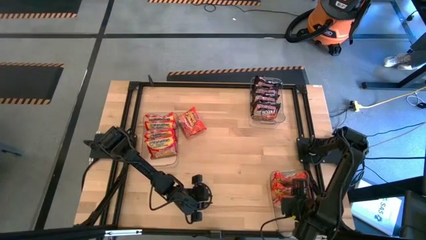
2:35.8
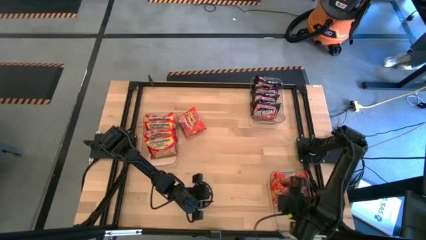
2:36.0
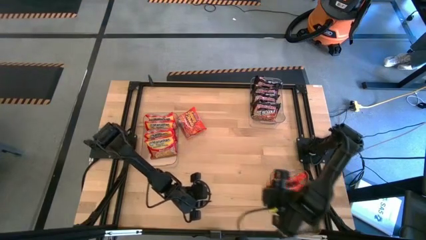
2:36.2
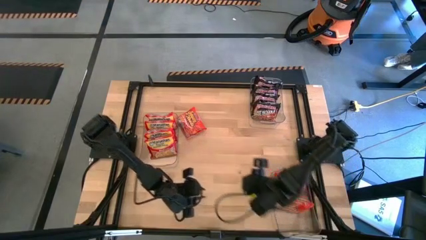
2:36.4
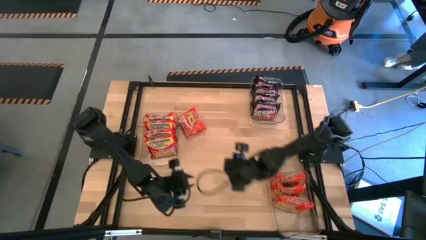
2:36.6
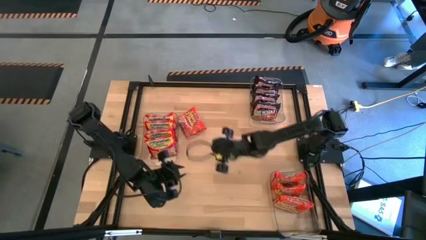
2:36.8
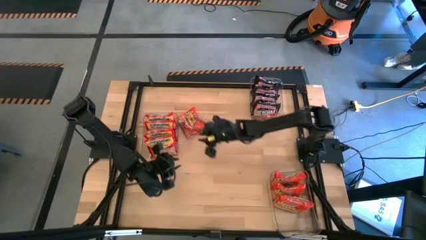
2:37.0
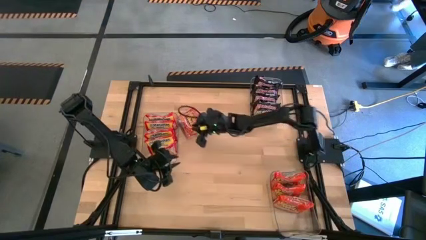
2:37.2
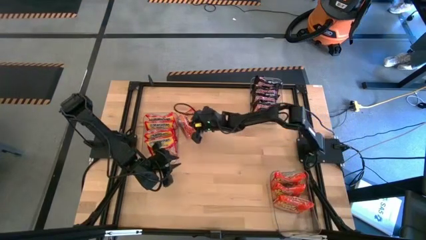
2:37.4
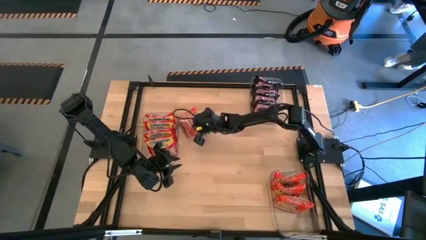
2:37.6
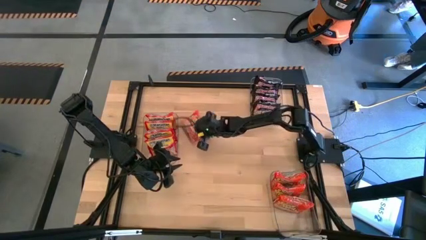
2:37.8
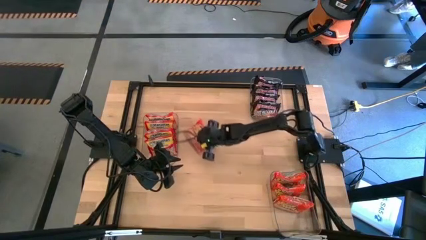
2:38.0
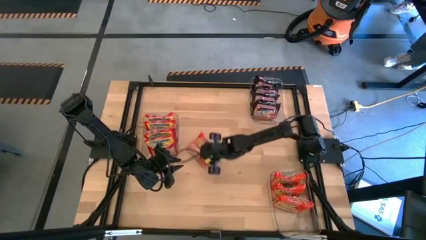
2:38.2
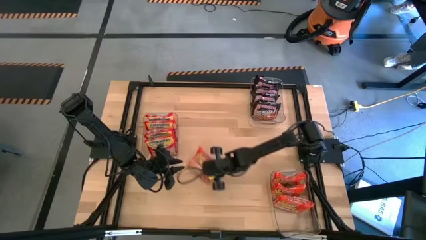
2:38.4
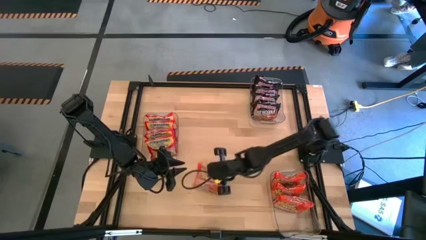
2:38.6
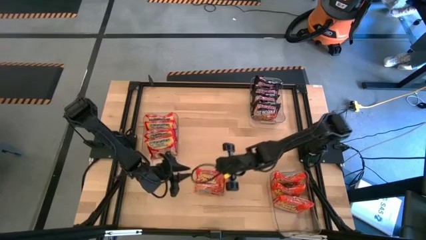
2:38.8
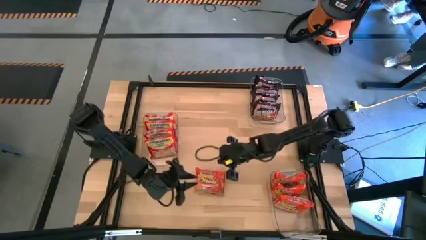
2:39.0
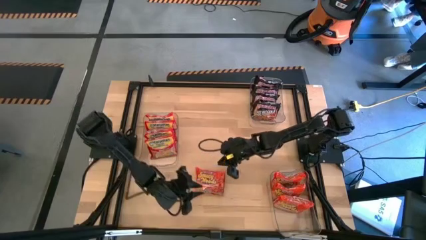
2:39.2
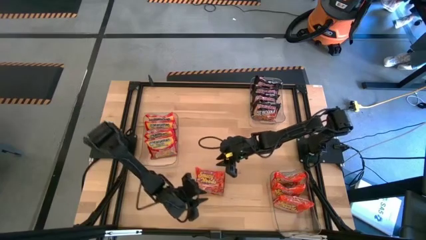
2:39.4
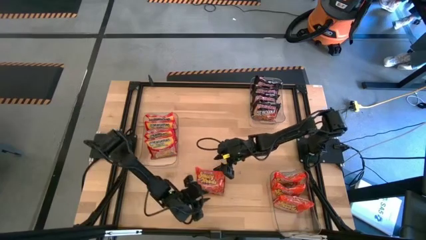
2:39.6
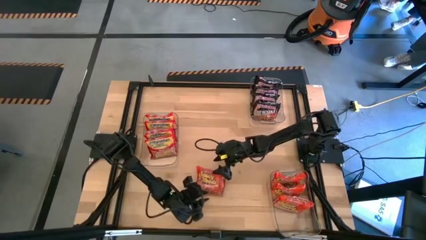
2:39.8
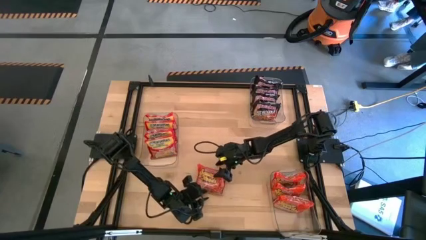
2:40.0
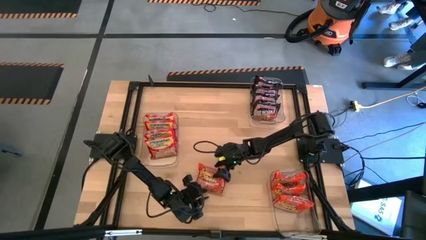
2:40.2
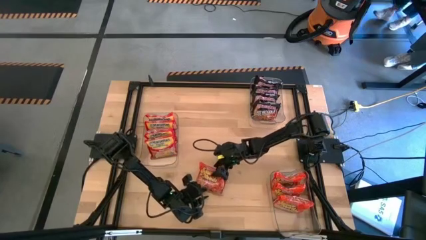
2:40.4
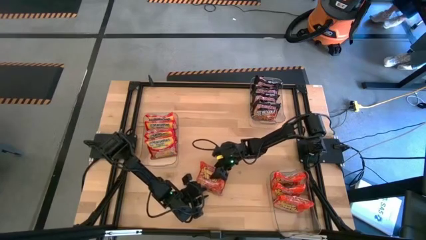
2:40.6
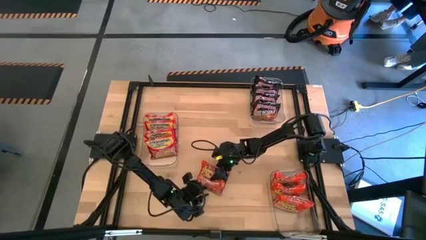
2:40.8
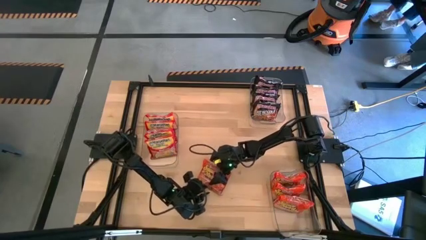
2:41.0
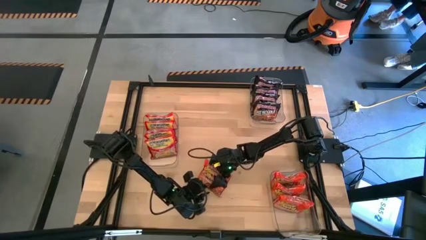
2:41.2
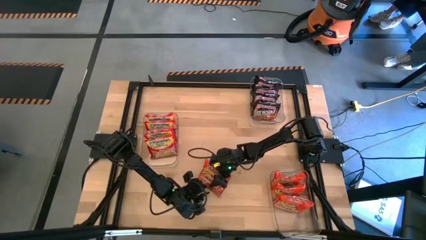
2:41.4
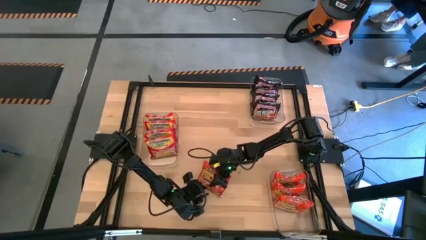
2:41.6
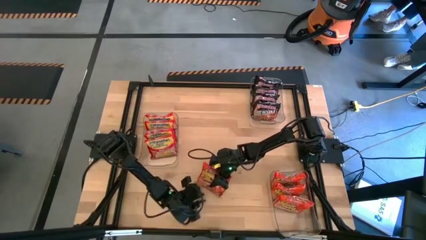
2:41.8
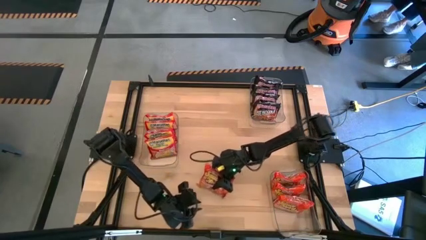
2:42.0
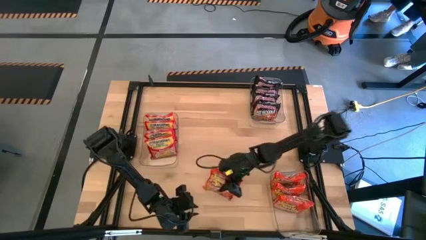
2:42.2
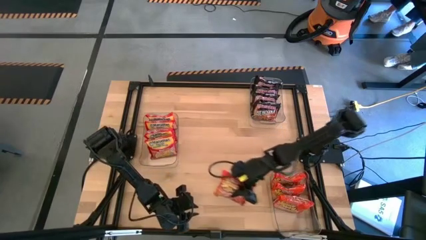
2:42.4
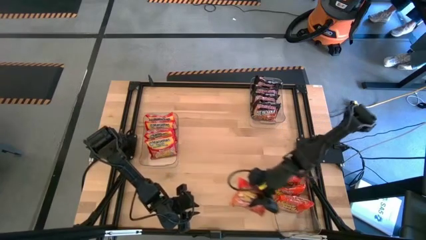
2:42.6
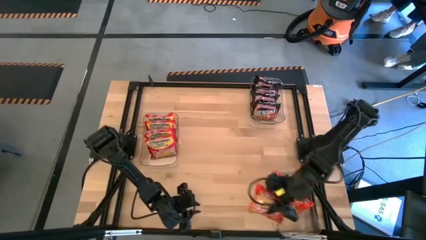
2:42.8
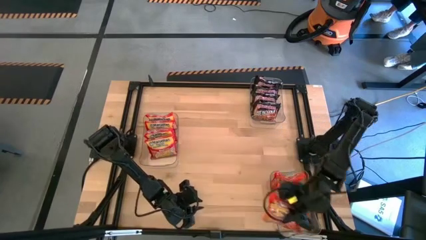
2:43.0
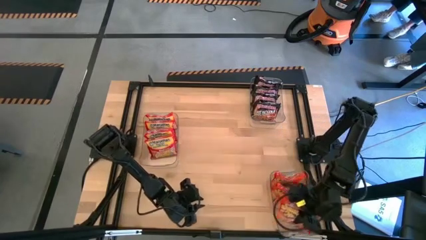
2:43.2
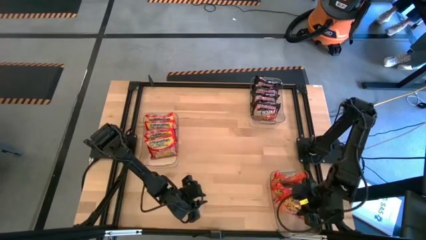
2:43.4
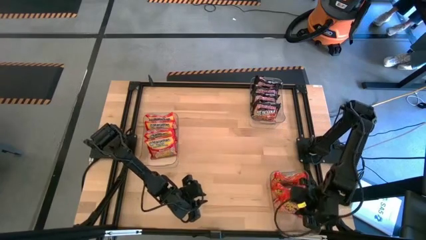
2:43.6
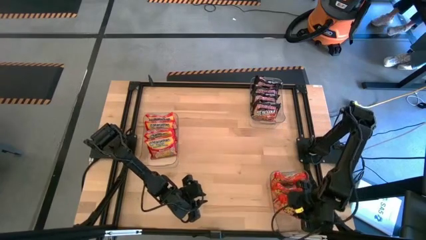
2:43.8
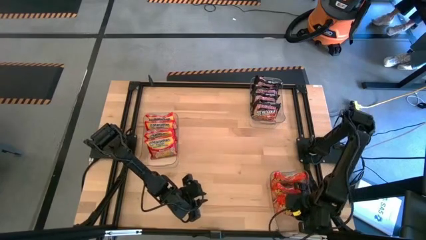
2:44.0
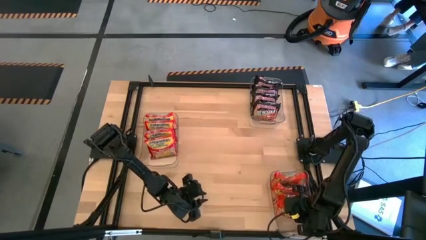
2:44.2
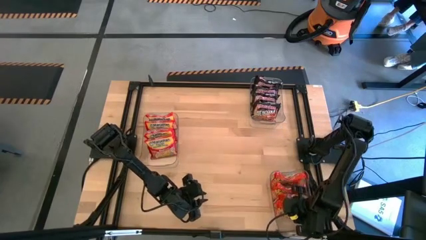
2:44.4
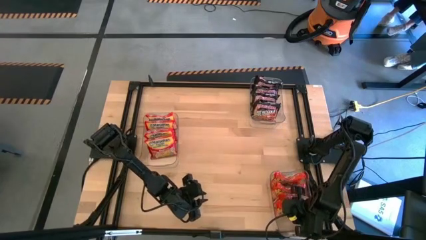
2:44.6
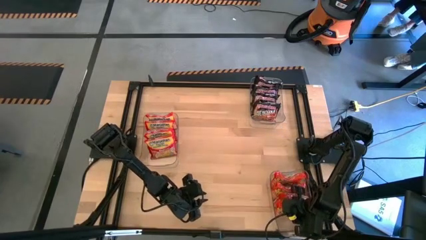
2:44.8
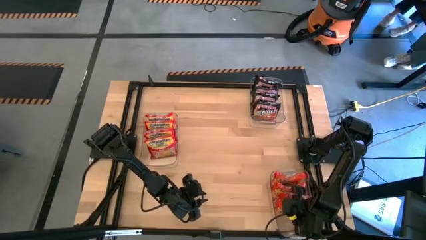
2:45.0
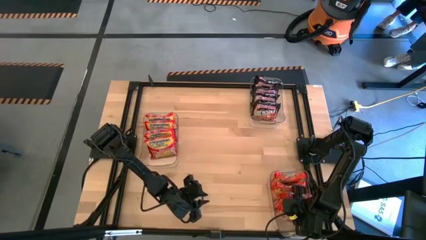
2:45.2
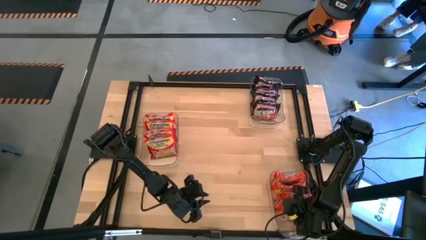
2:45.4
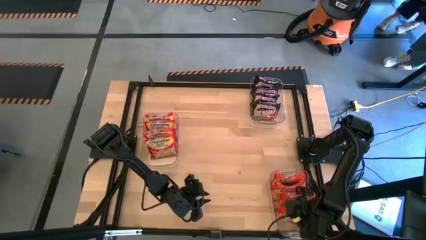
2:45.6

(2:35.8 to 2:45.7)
Task: Sort Maruchan noodles
Put the orange noodle pack into the bottom transparent bin

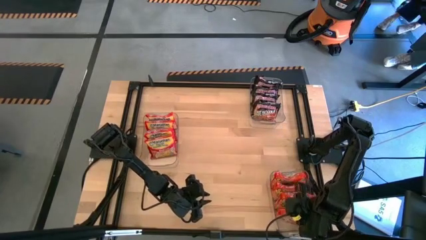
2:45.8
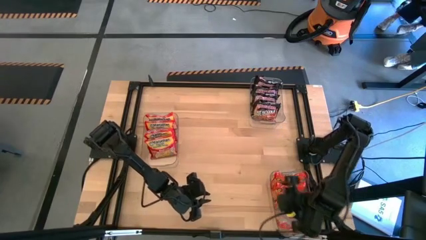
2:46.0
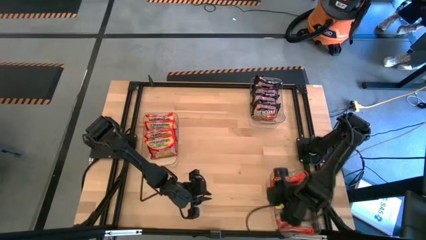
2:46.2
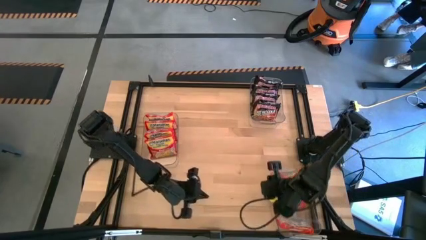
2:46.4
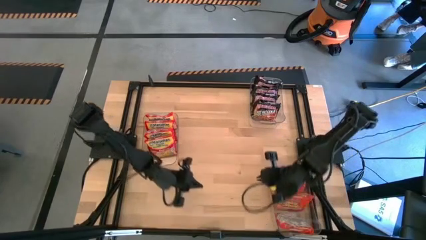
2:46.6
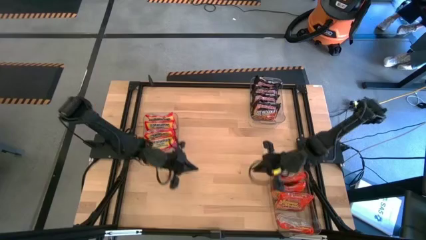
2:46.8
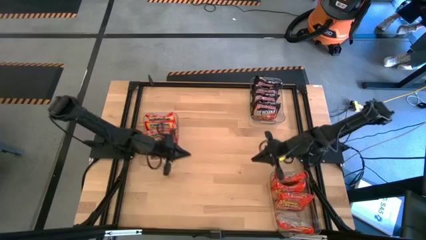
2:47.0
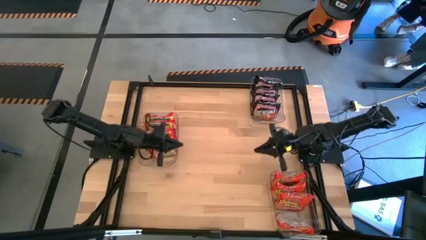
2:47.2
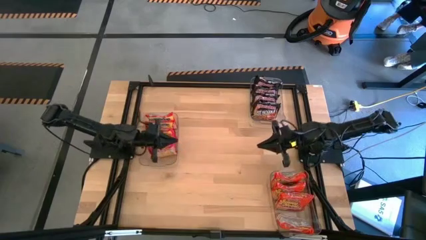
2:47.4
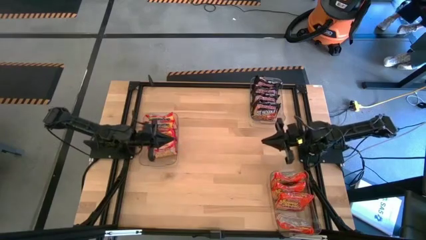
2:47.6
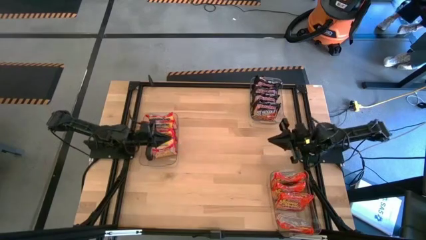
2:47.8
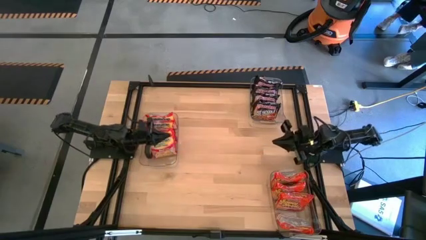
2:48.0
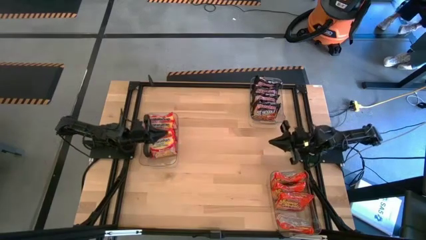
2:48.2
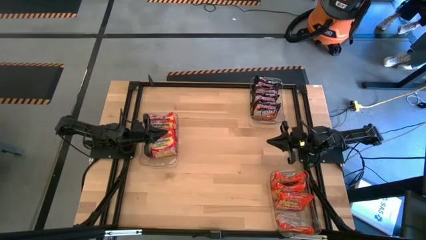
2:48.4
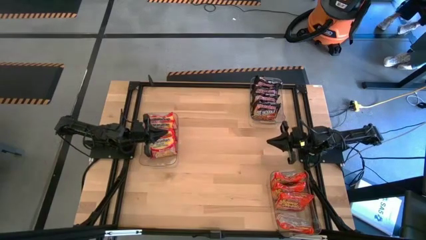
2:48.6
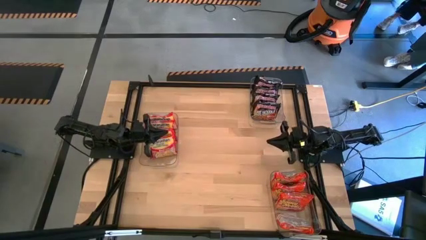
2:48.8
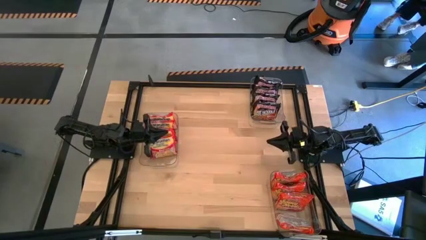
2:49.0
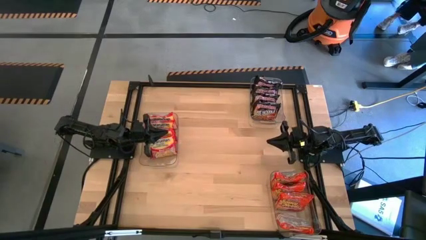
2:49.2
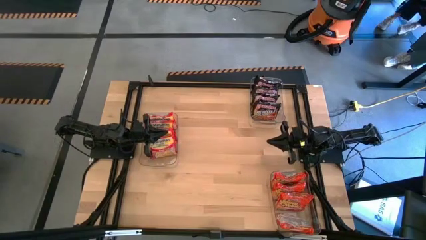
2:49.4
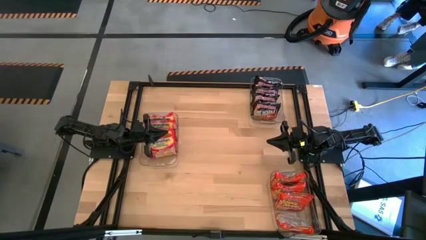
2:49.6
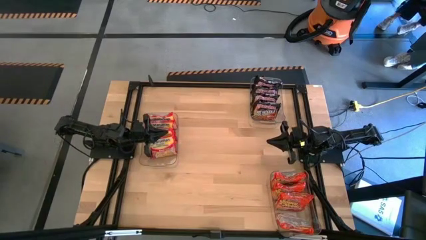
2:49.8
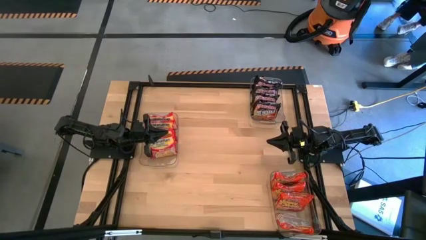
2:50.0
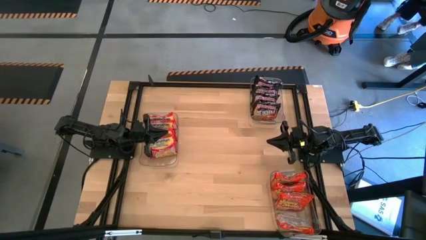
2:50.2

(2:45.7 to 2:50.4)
Return to Home Position
